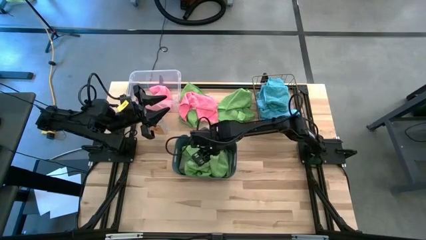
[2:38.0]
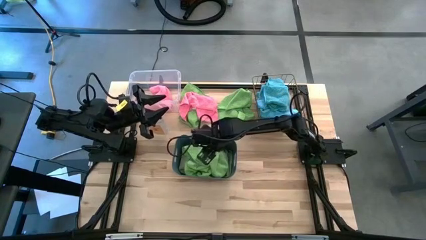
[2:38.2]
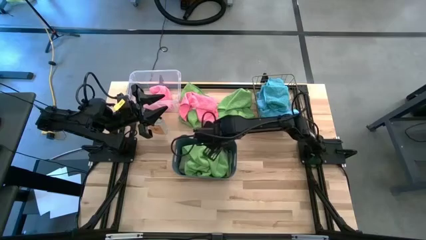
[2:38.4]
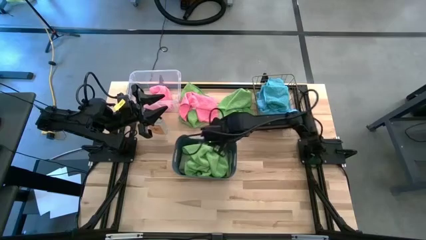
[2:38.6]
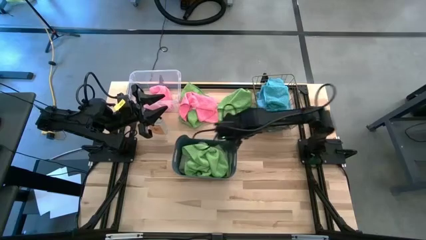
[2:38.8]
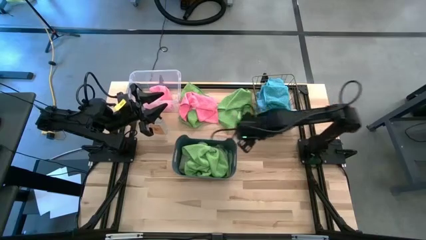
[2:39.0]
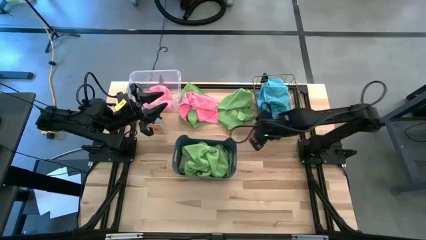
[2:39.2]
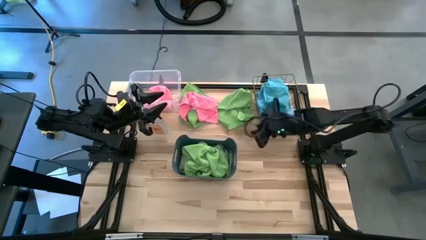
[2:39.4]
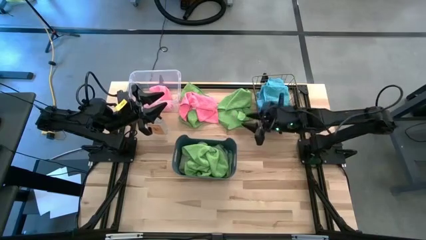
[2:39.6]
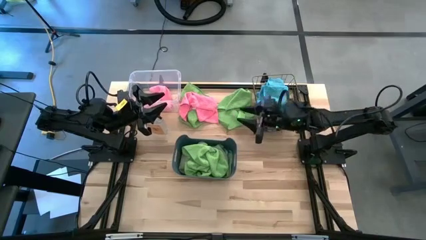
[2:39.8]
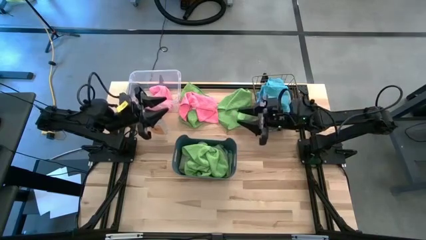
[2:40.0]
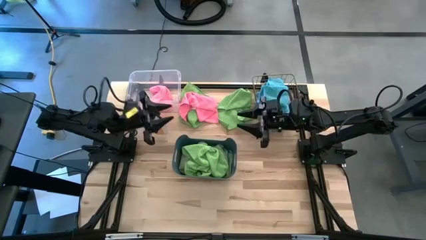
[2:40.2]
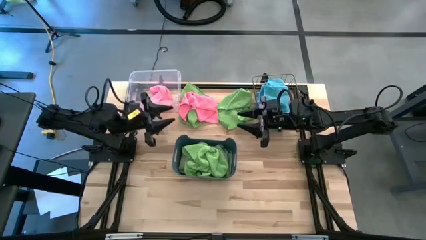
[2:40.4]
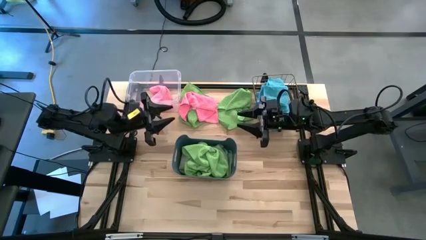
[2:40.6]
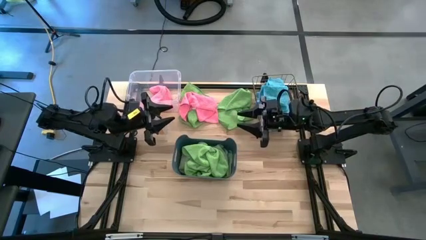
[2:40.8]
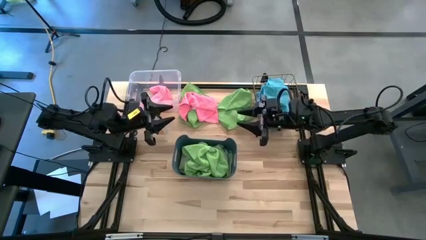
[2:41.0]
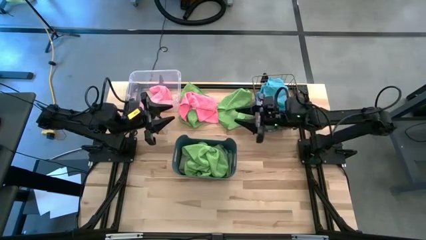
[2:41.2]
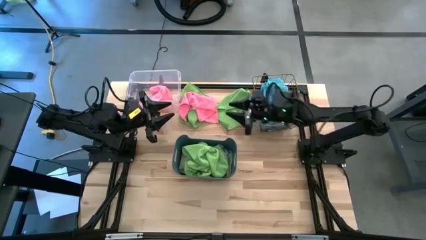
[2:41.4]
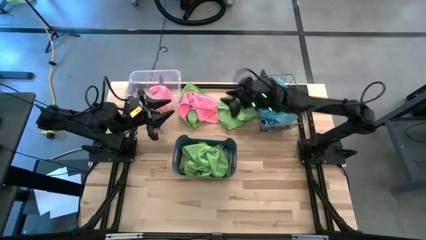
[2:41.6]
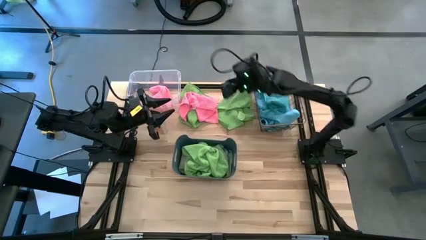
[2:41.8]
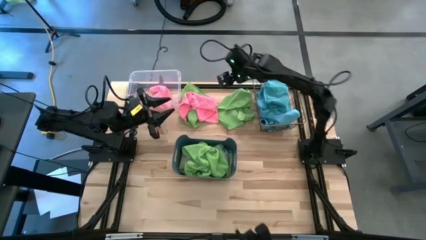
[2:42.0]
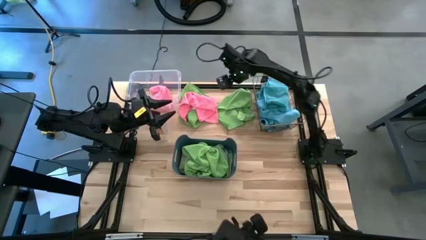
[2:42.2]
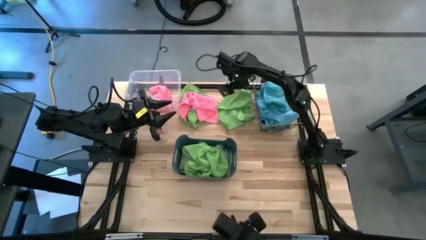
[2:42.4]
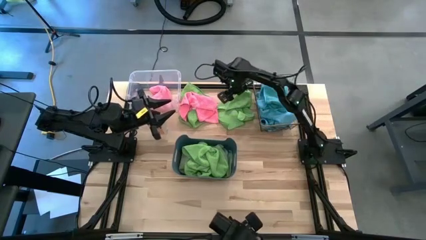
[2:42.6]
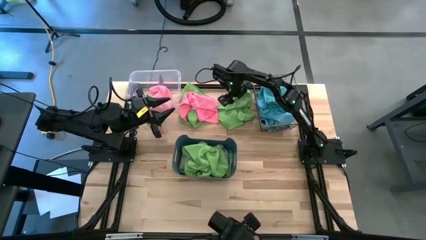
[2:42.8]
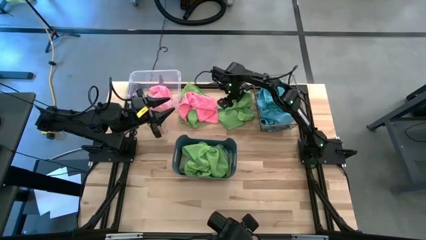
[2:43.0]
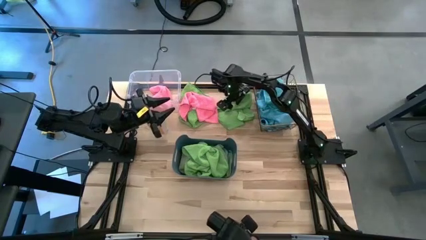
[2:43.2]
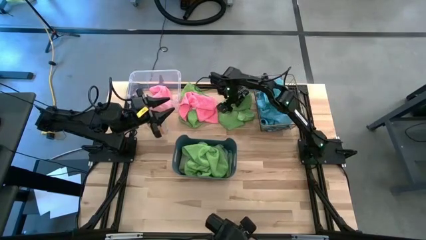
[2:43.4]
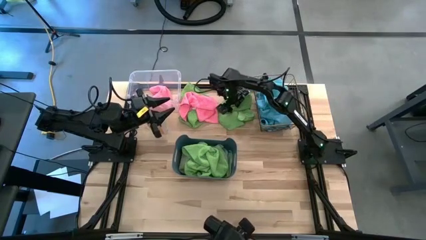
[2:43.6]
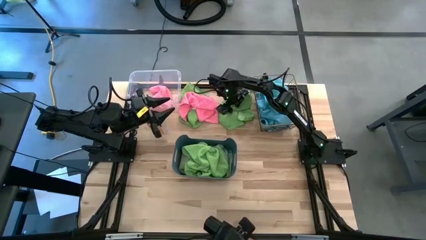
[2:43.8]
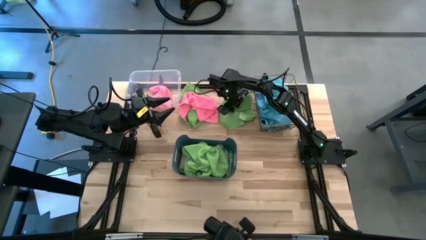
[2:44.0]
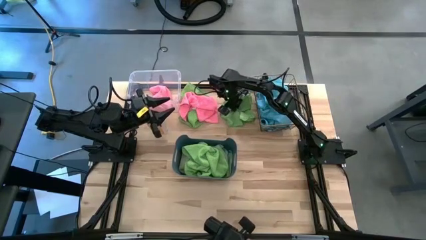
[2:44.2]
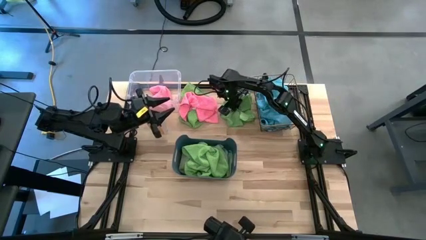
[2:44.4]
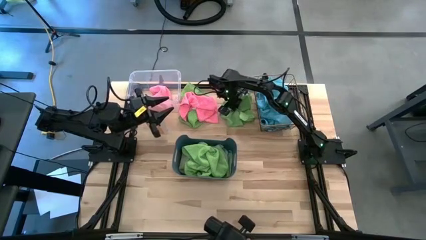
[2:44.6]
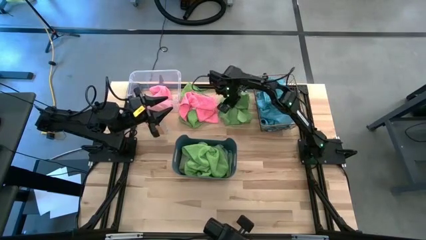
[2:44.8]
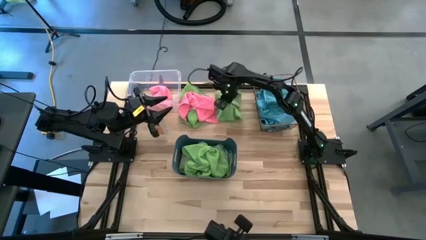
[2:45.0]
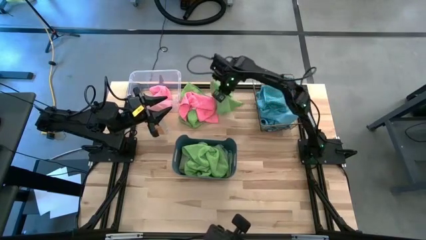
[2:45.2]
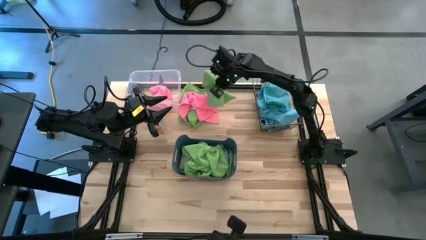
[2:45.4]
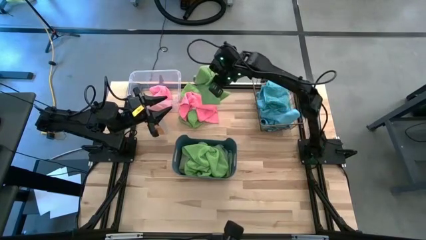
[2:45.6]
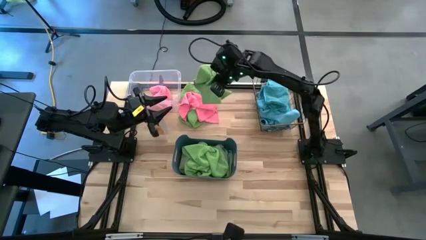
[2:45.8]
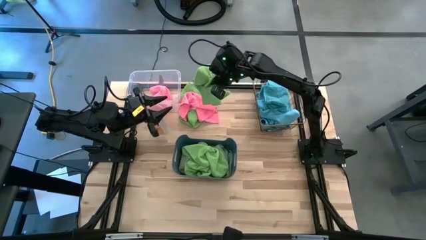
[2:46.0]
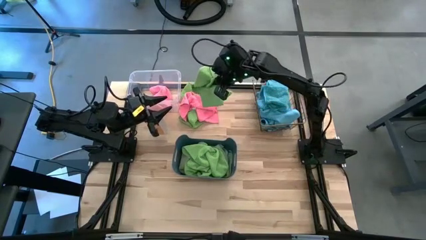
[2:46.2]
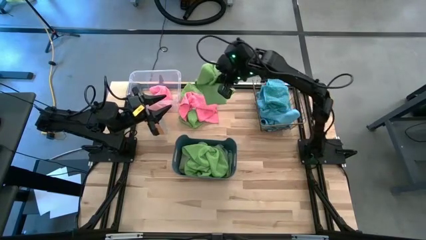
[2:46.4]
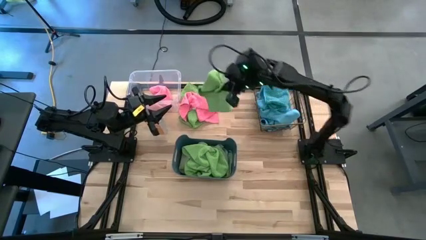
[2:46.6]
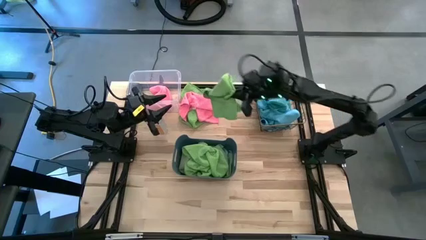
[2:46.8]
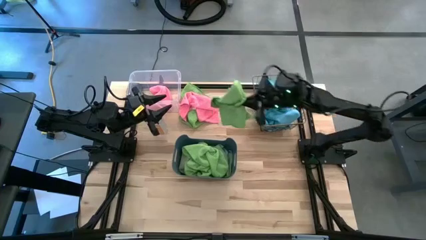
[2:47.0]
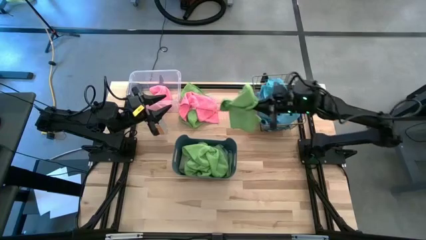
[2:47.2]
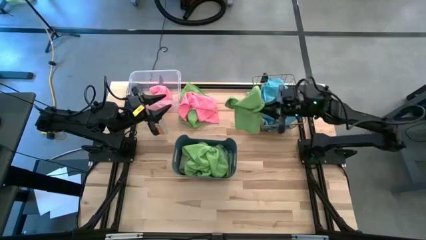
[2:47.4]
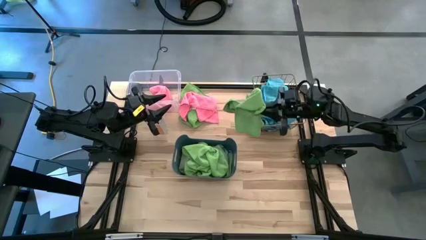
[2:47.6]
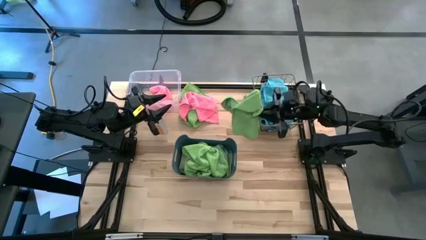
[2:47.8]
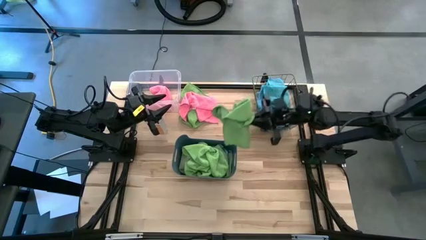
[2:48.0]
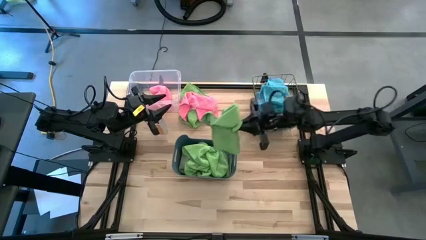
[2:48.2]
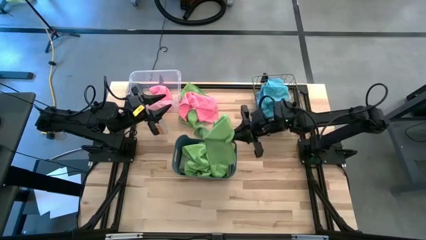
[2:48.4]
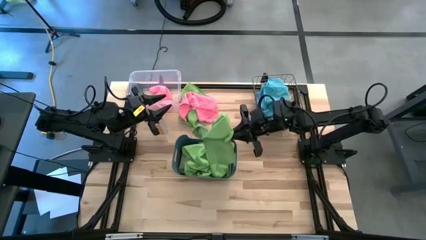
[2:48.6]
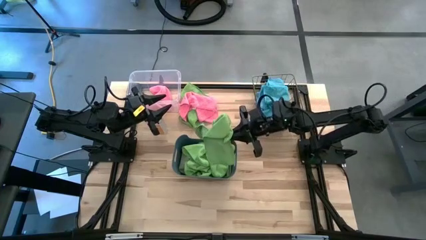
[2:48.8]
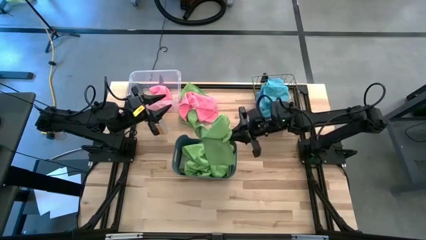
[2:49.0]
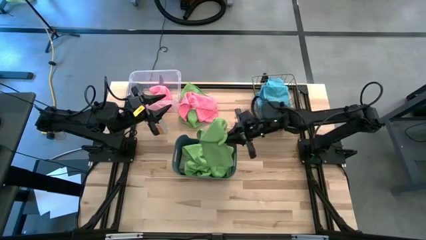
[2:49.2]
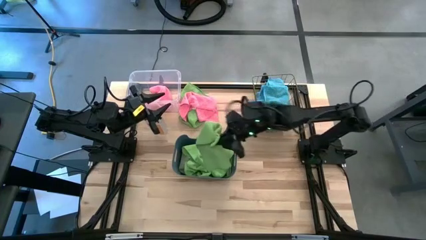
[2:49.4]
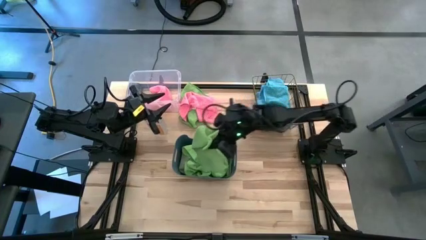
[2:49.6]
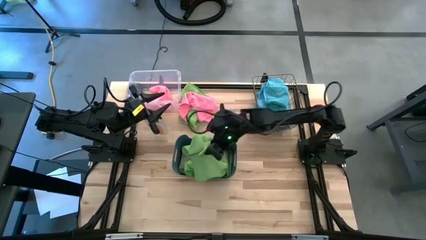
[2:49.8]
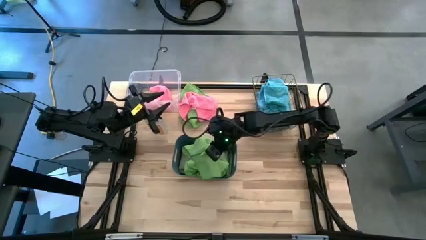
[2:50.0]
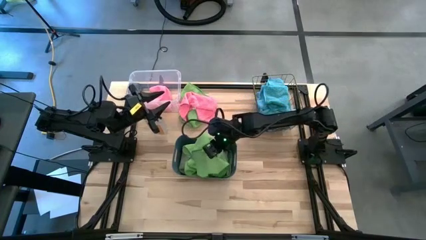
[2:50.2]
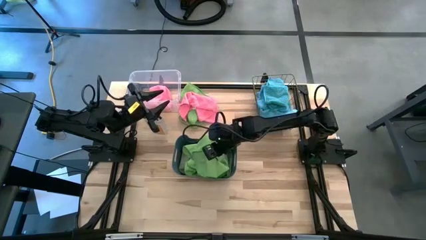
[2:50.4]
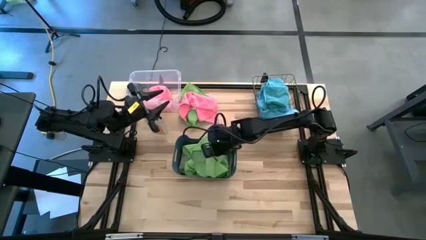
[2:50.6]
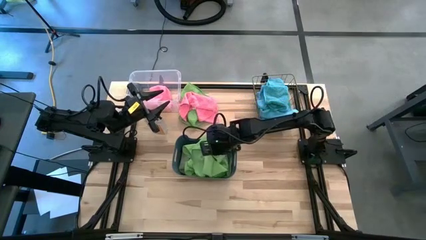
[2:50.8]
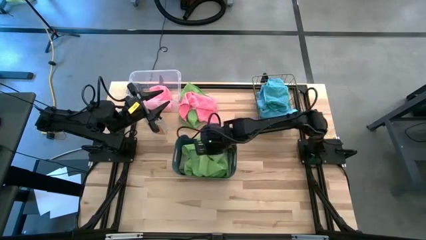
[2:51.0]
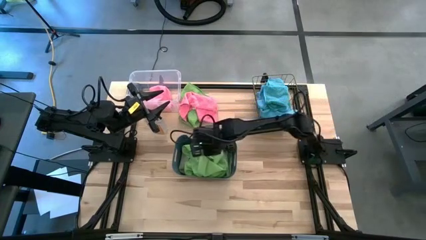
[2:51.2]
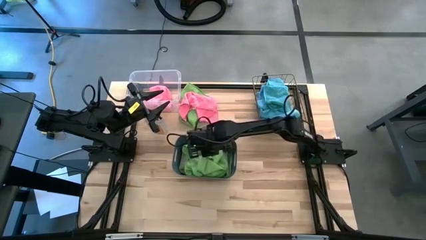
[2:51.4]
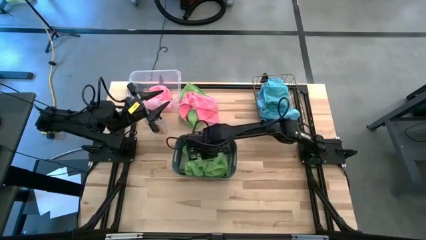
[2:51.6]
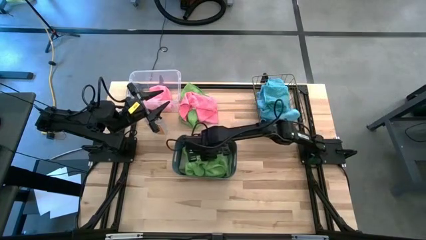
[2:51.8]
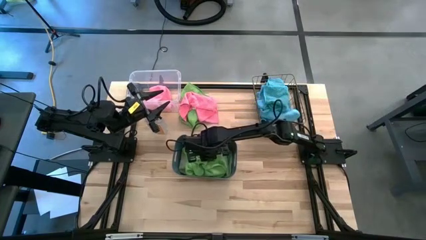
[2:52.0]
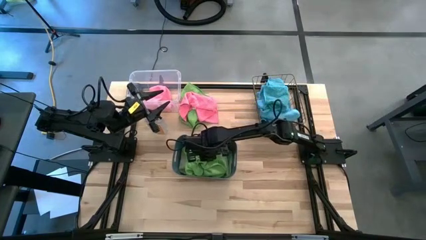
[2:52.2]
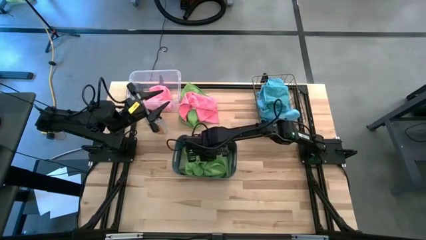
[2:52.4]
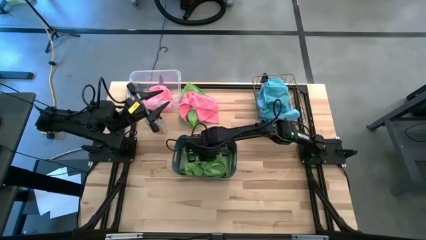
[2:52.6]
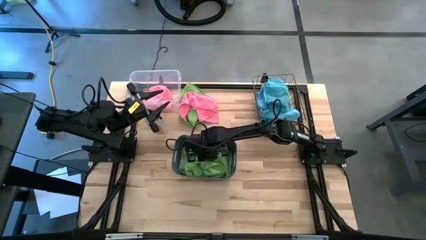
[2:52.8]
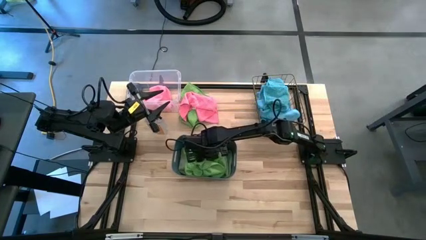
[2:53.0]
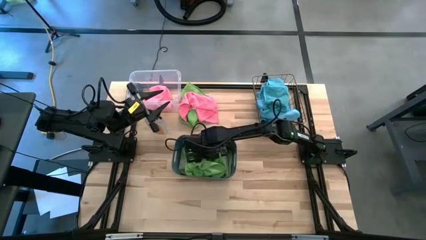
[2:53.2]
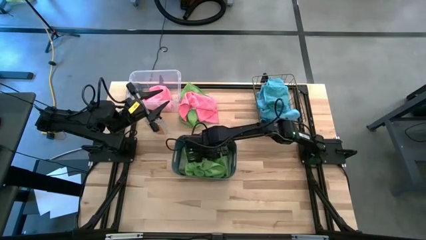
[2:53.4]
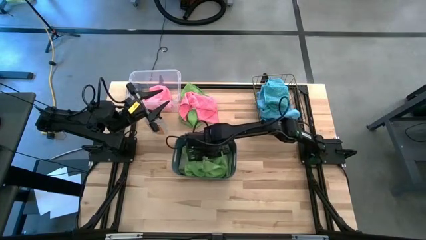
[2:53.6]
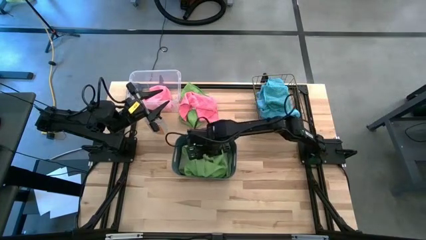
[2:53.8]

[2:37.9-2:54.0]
Task: Sort microfiber towel by color & place in baskets
Put the green microfiber cloth into the blue bin
